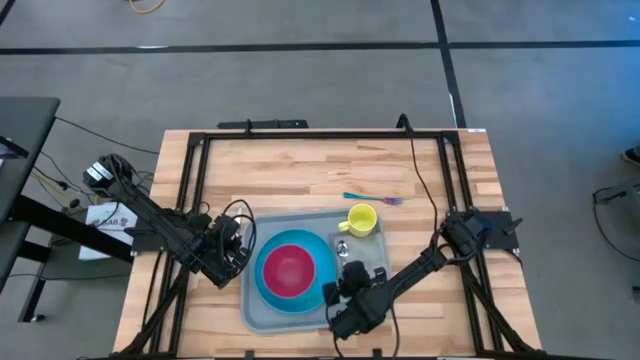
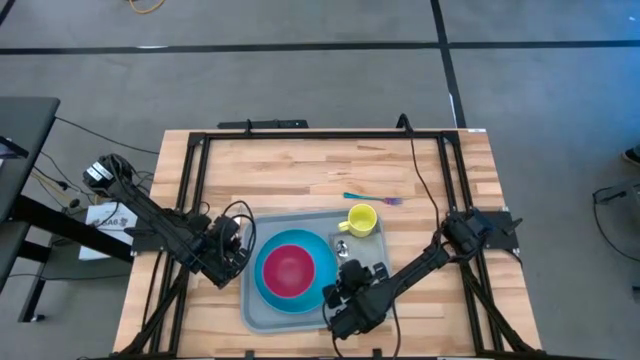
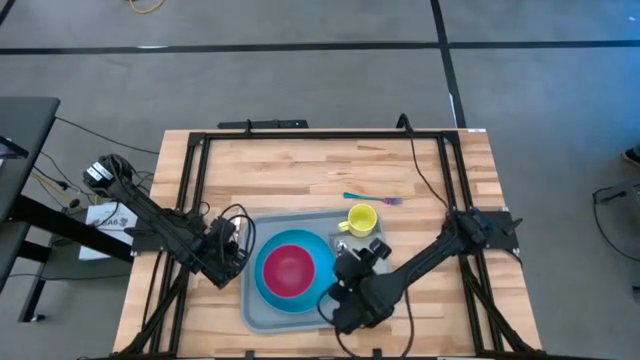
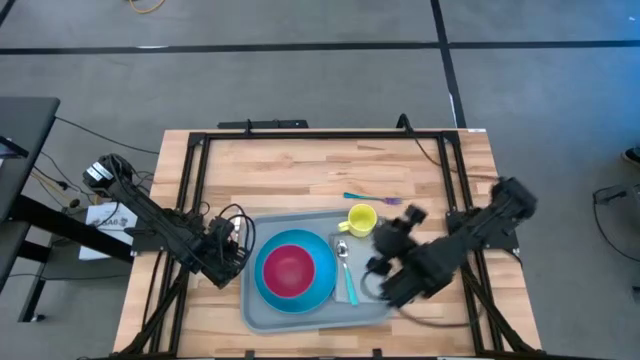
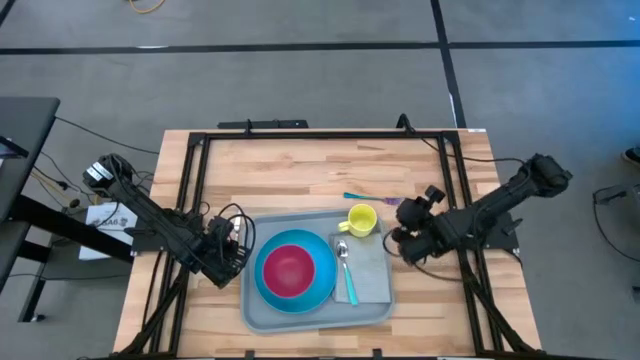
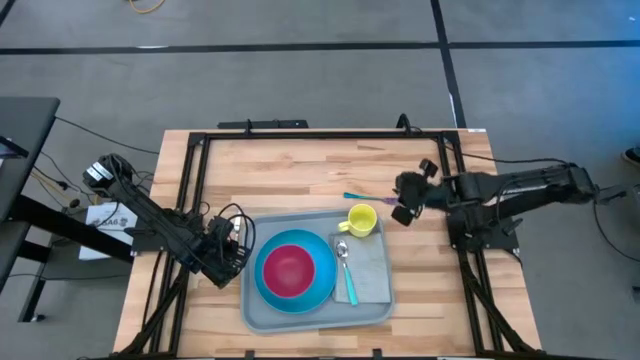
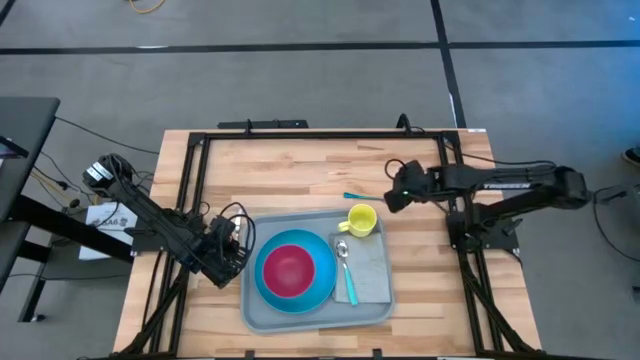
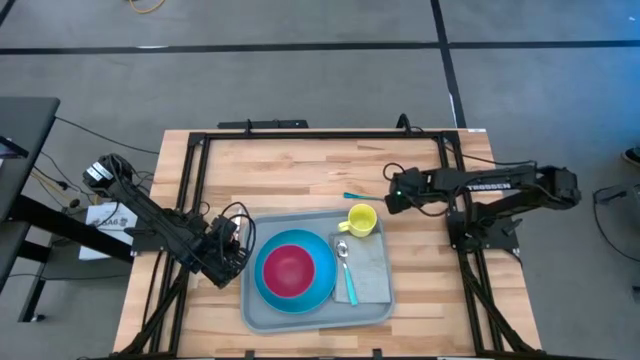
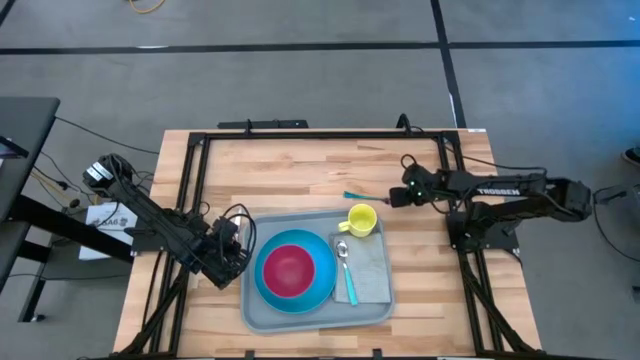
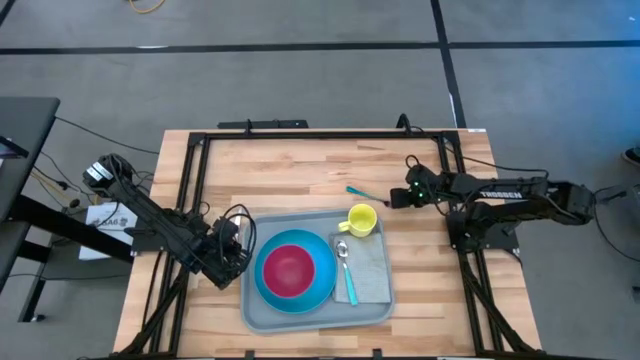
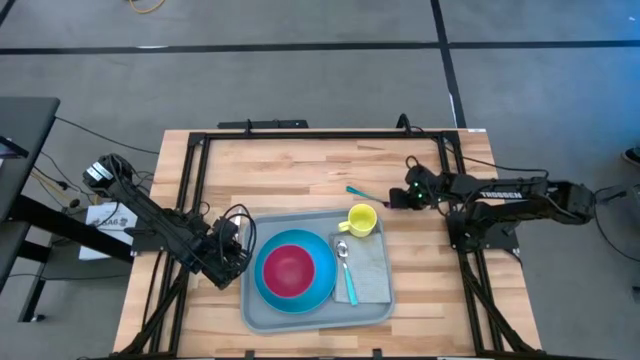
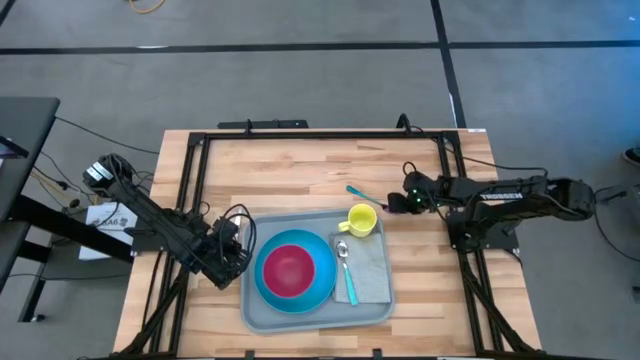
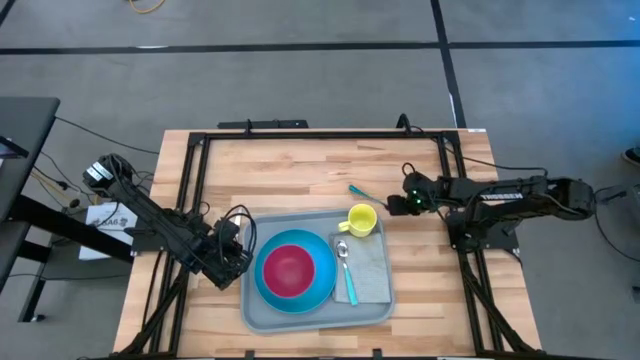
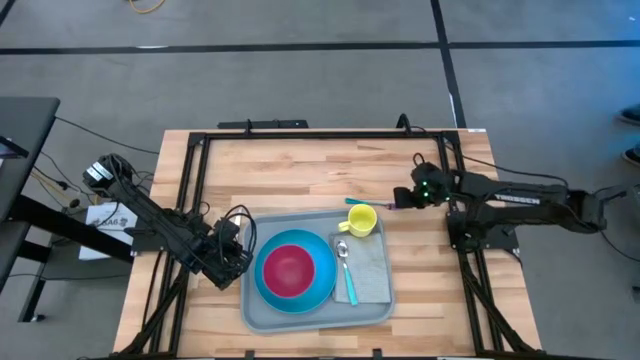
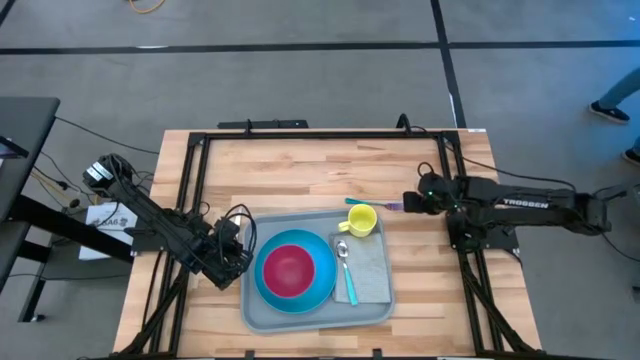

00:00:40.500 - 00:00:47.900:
Task: Set up tray
Put the blue fork on the gray napkin on the gray tray to the right of the light blue spoon

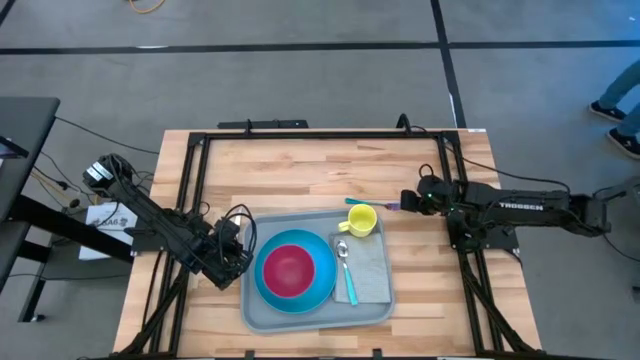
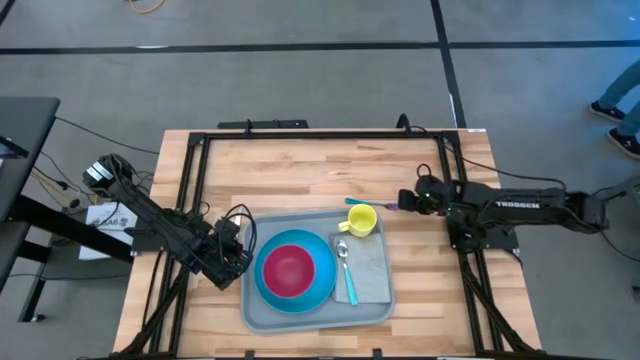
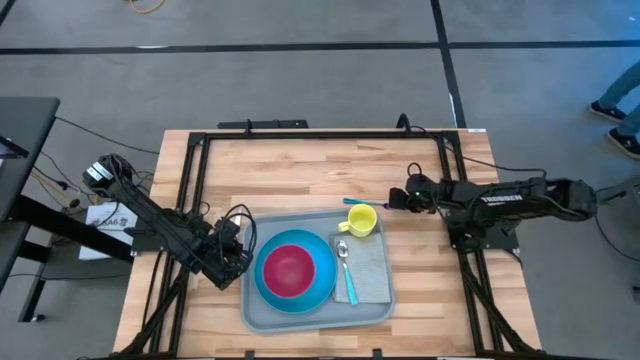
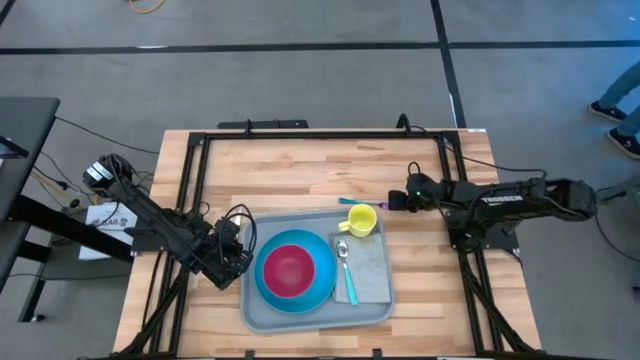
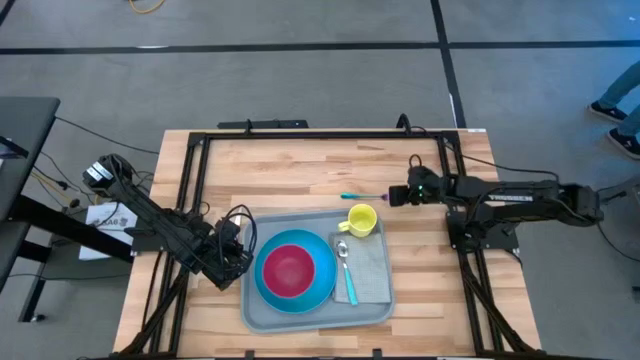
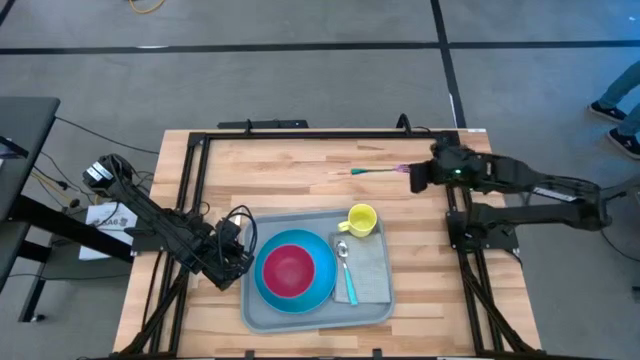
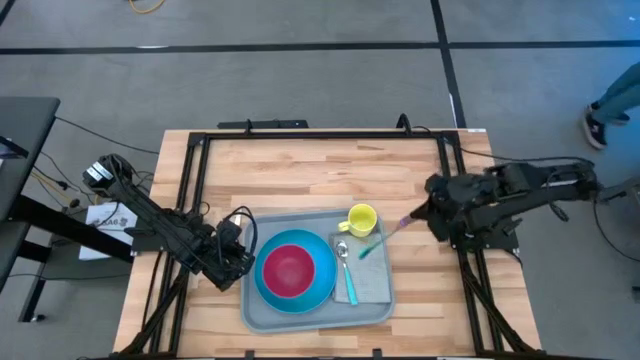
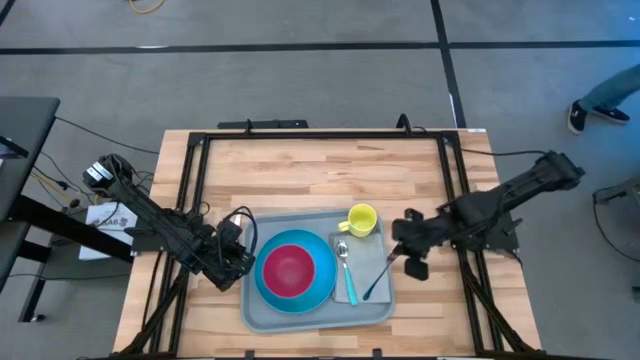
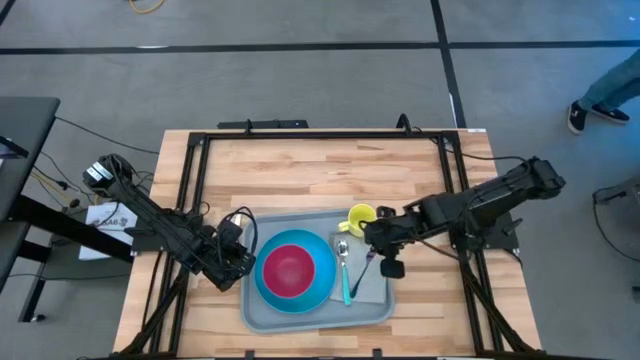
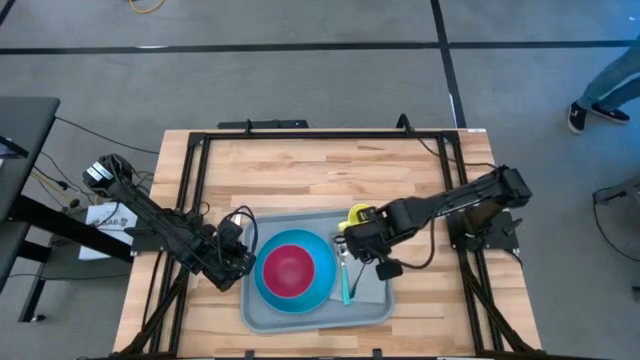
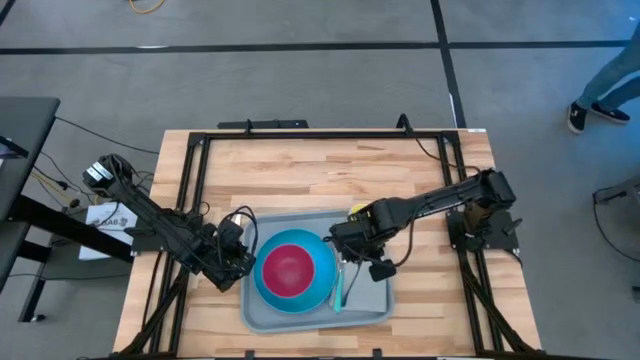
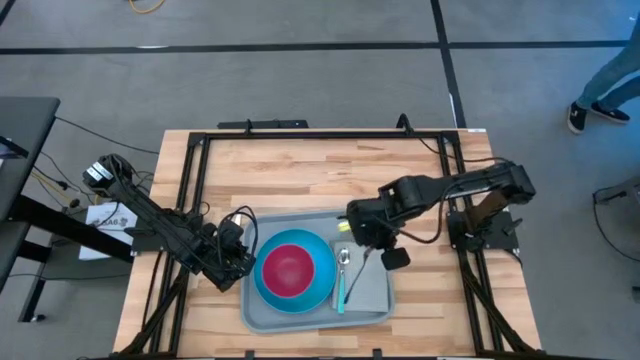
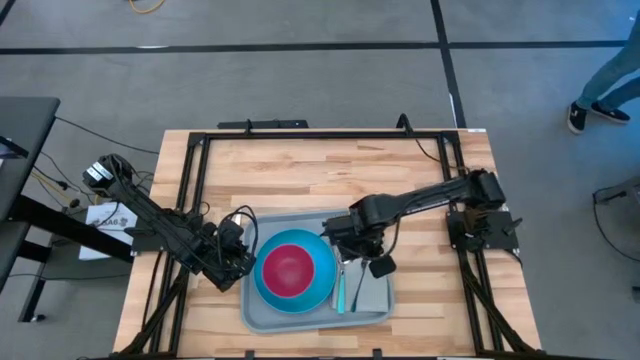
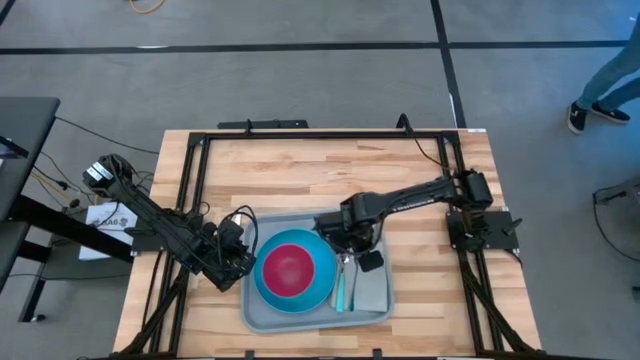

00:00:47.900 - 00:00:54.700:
Put the blue fork on the gray napkin on the gray tray to the right of the light blue spoon

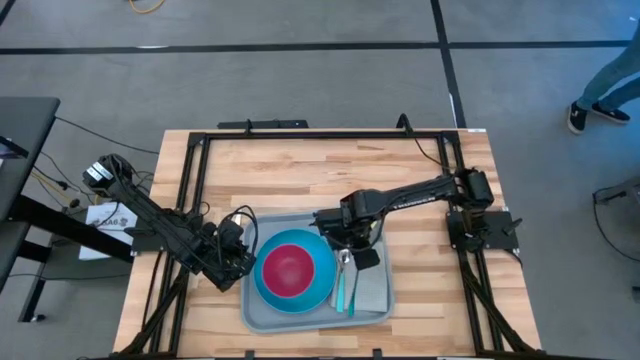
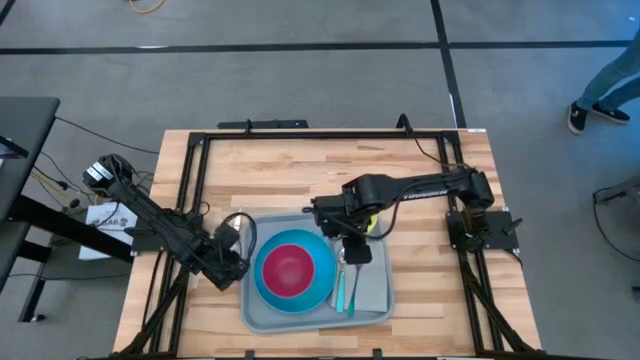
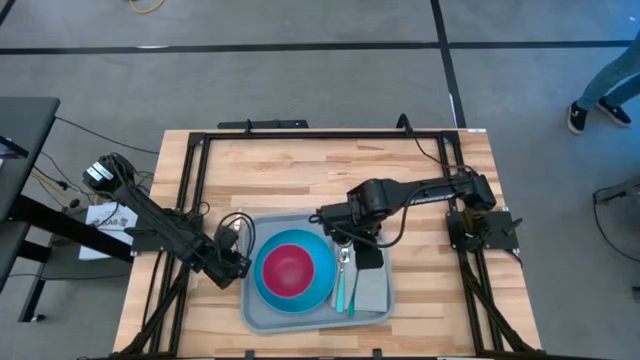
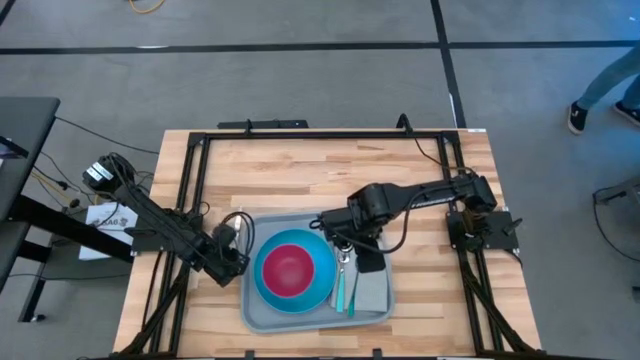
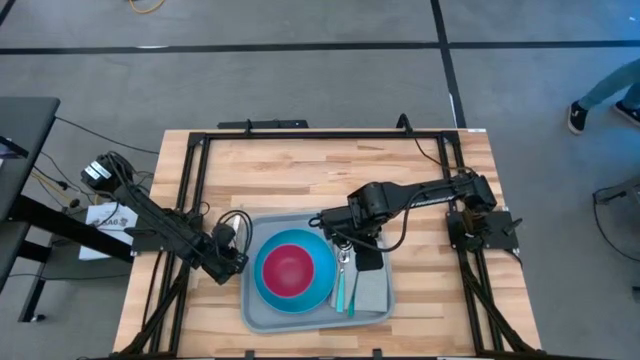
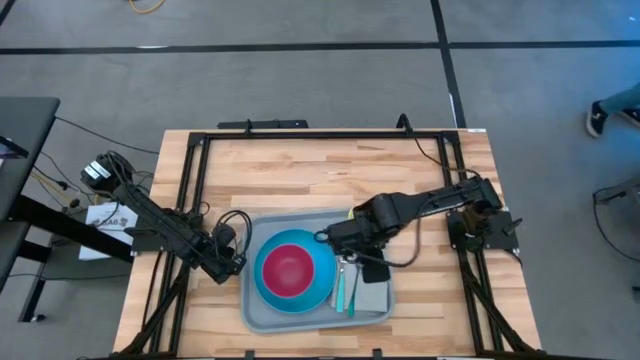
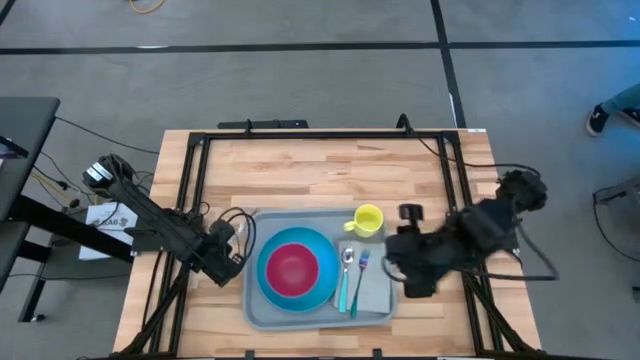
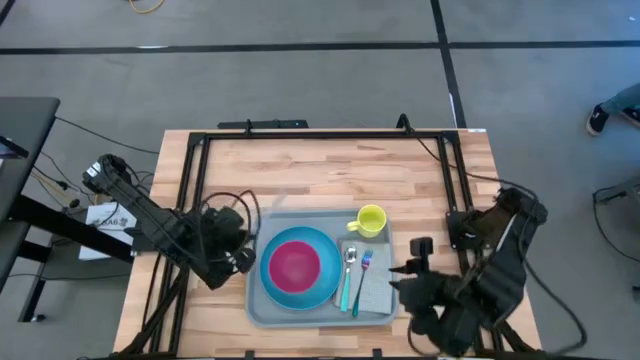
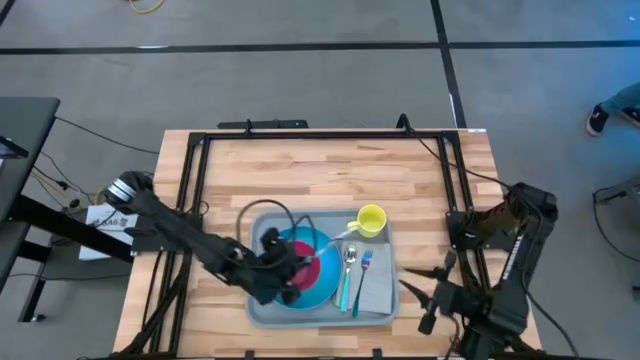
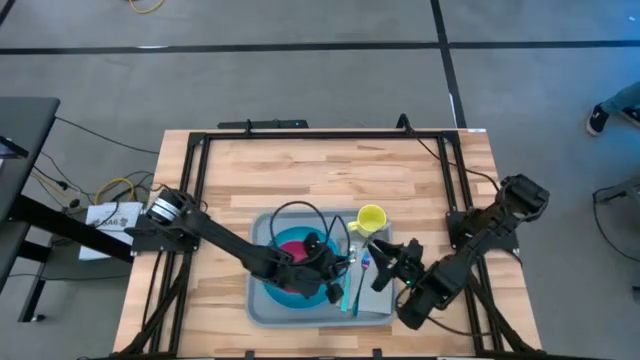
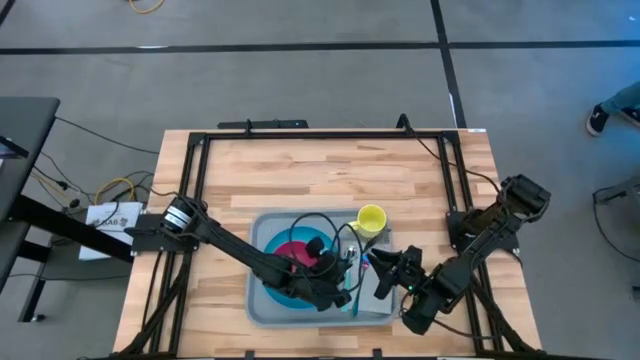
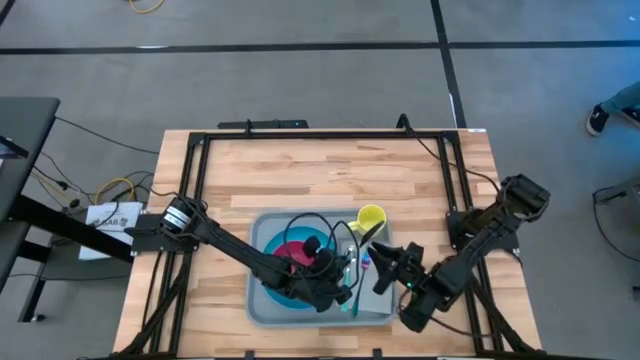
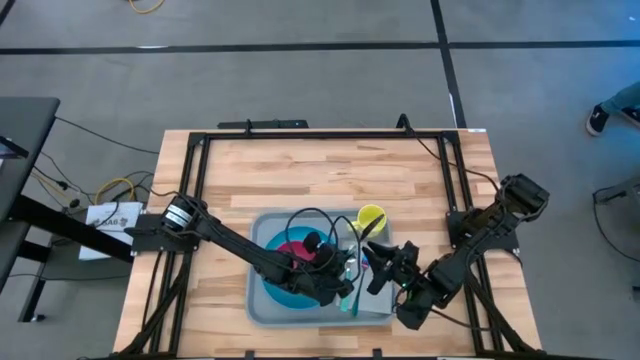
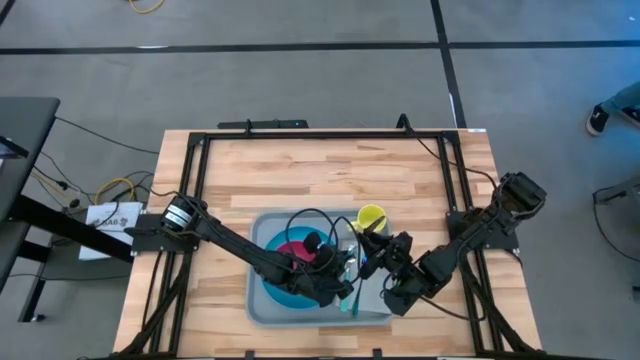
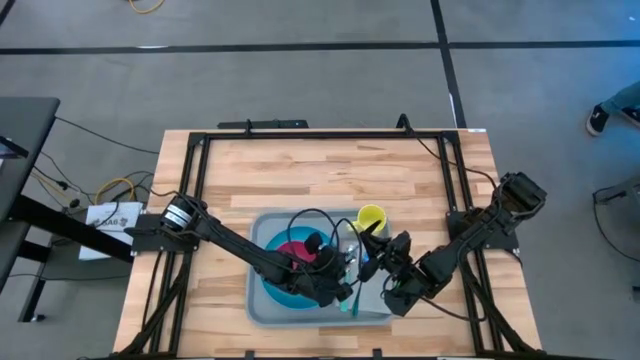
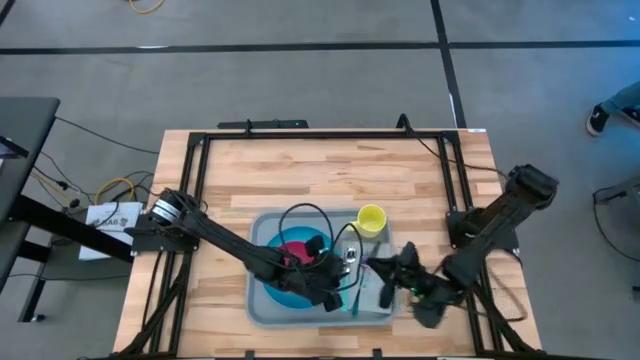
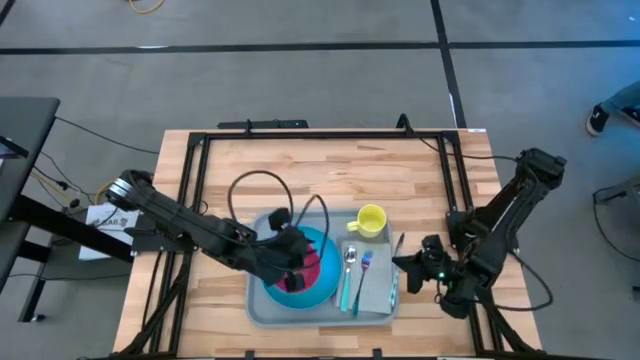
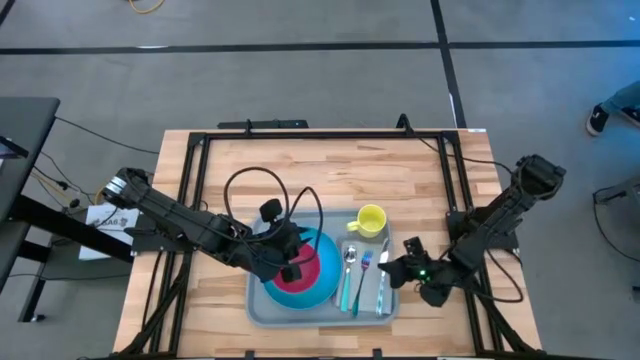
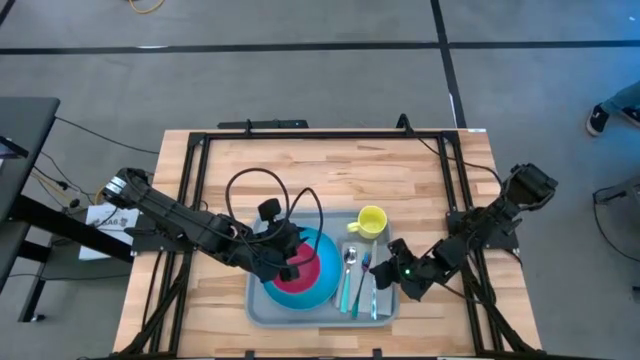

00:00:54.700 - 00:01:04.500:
Put the patterned blue knife on the gray napkin on the gray tray to the right of the blue fork
